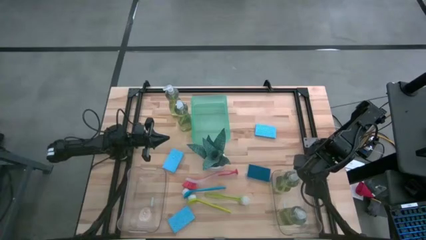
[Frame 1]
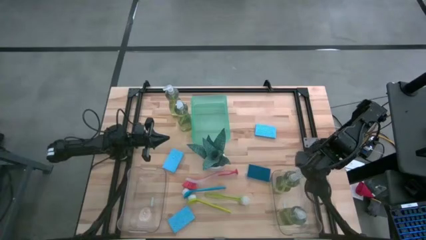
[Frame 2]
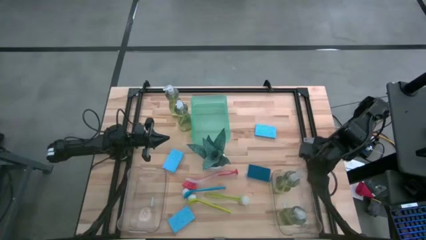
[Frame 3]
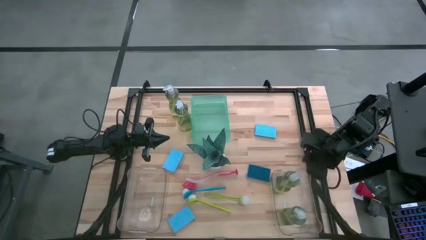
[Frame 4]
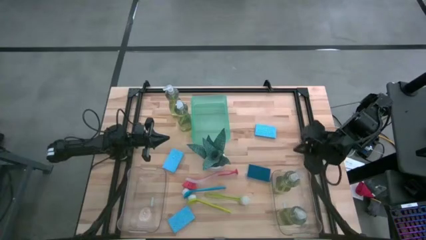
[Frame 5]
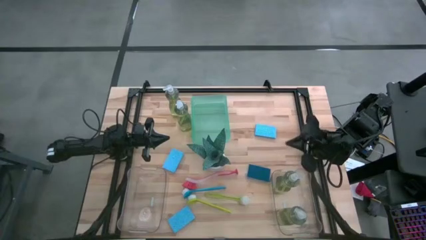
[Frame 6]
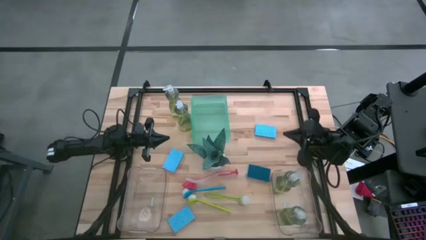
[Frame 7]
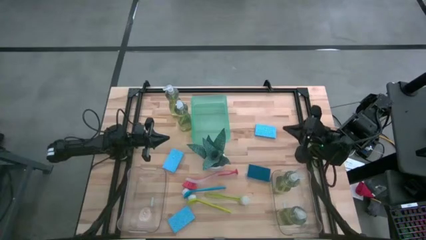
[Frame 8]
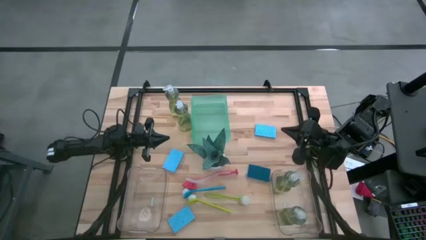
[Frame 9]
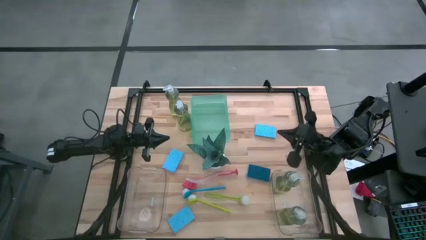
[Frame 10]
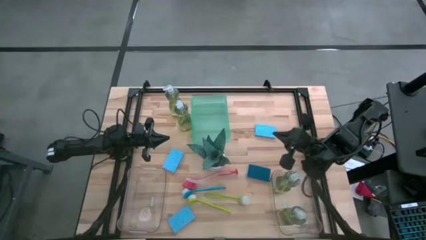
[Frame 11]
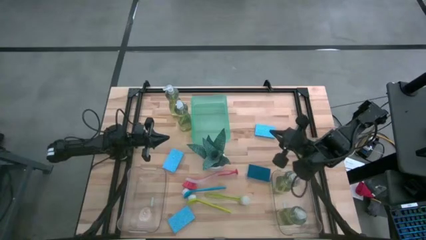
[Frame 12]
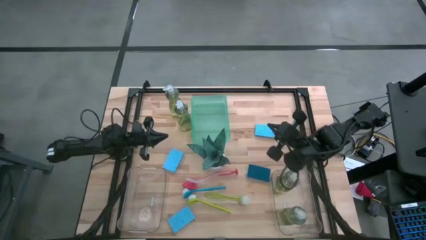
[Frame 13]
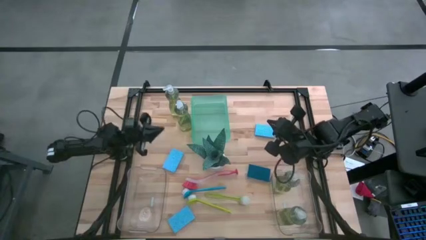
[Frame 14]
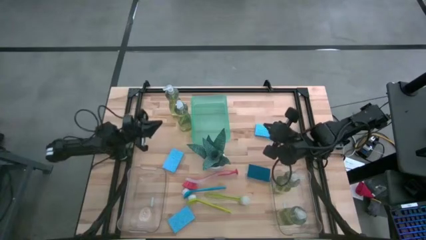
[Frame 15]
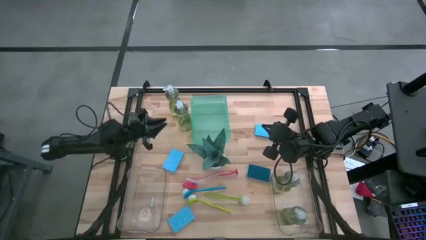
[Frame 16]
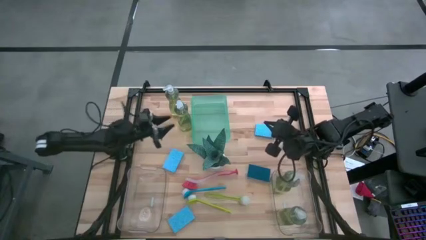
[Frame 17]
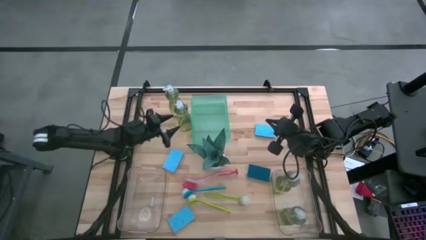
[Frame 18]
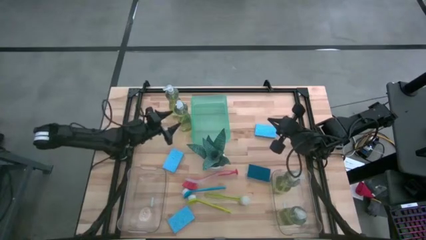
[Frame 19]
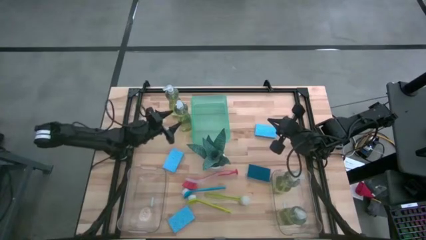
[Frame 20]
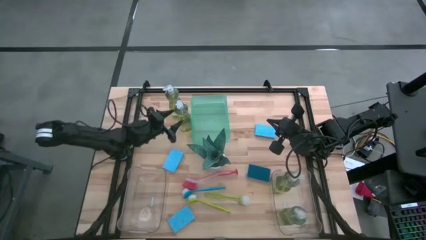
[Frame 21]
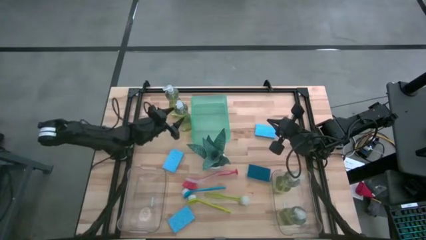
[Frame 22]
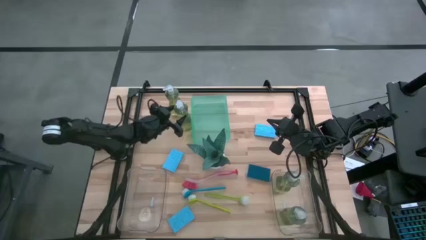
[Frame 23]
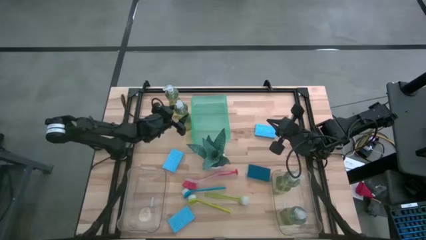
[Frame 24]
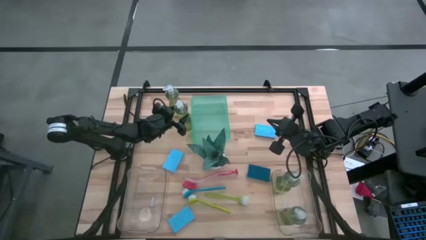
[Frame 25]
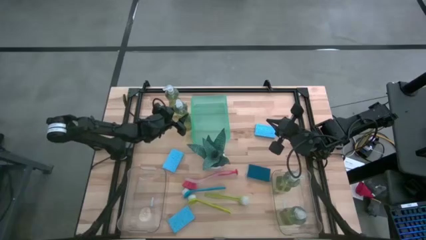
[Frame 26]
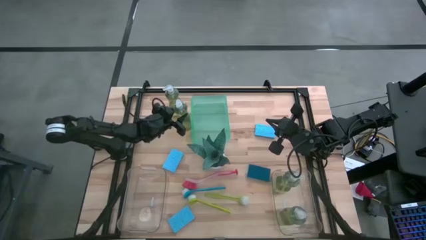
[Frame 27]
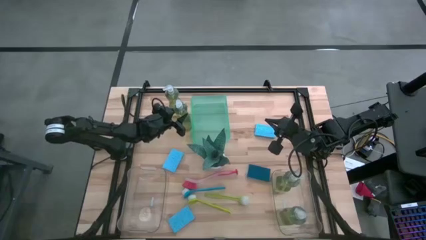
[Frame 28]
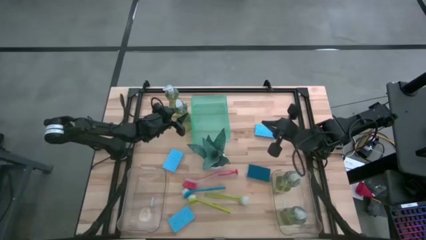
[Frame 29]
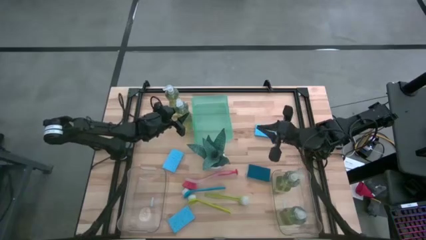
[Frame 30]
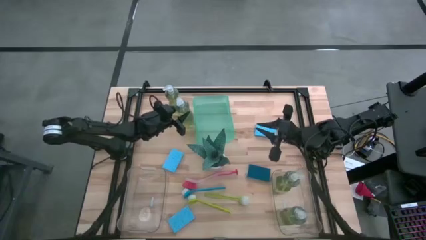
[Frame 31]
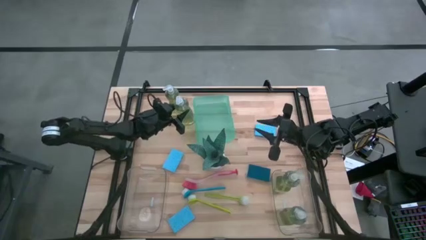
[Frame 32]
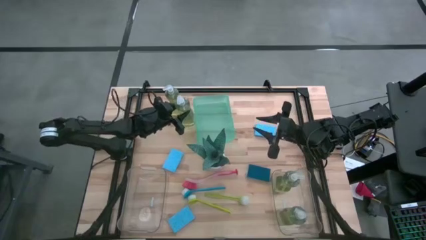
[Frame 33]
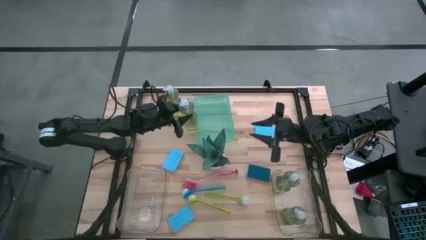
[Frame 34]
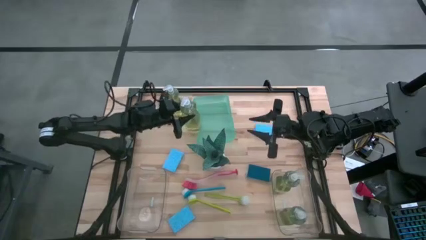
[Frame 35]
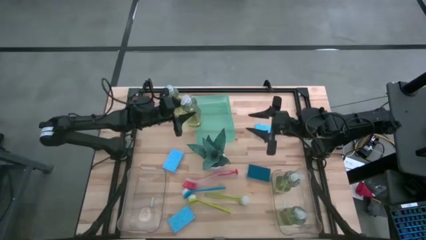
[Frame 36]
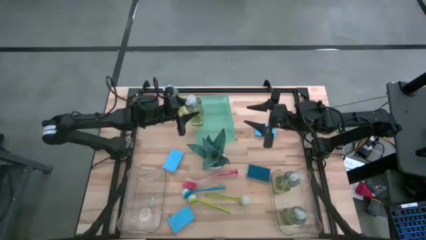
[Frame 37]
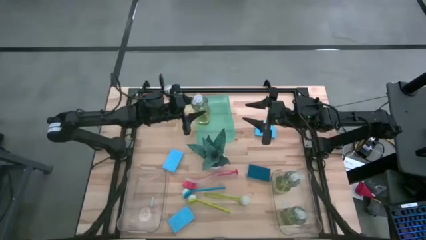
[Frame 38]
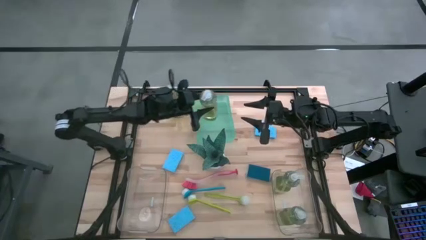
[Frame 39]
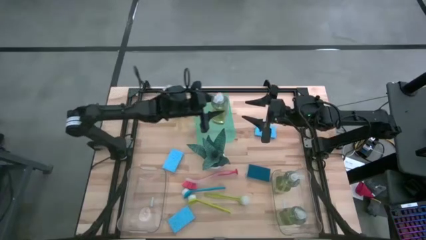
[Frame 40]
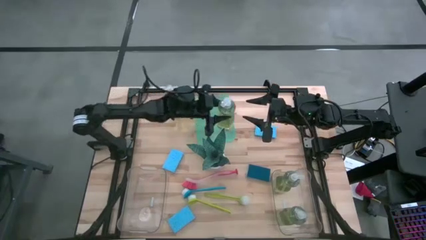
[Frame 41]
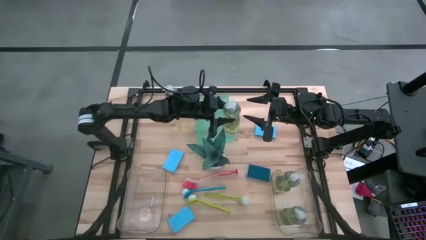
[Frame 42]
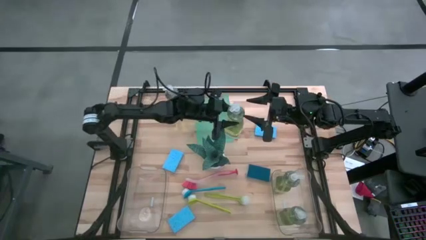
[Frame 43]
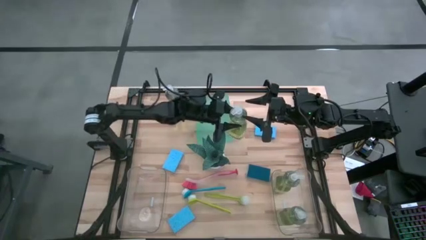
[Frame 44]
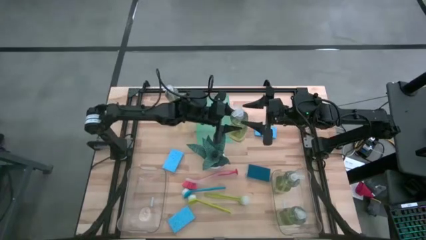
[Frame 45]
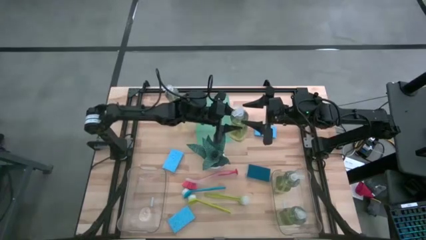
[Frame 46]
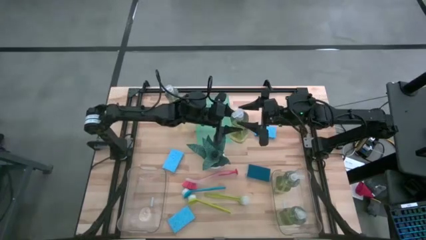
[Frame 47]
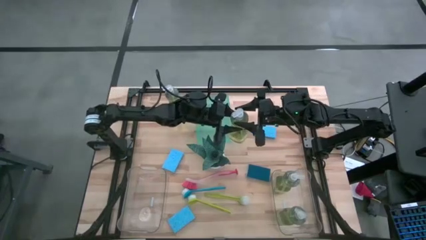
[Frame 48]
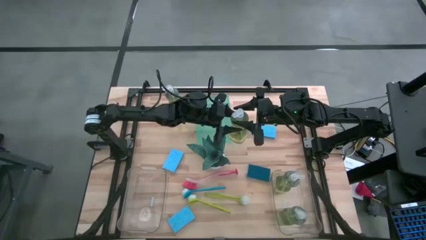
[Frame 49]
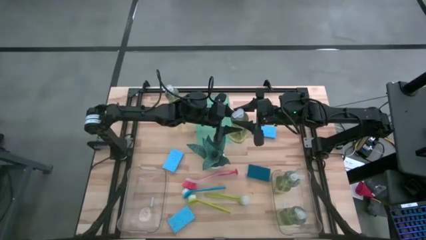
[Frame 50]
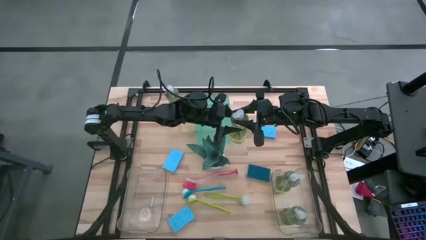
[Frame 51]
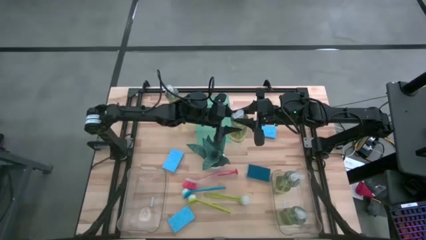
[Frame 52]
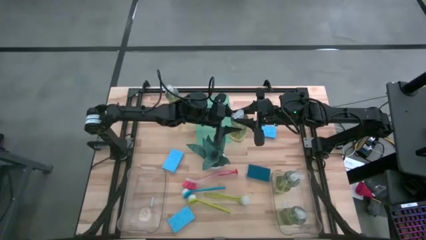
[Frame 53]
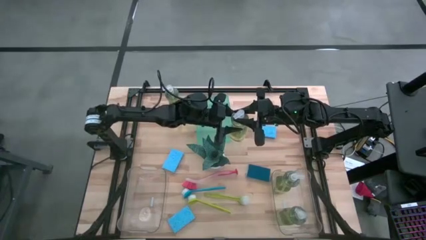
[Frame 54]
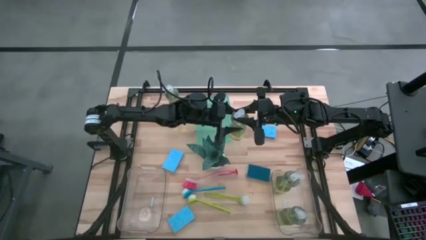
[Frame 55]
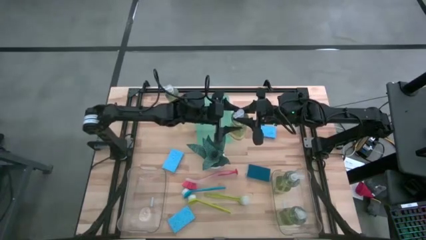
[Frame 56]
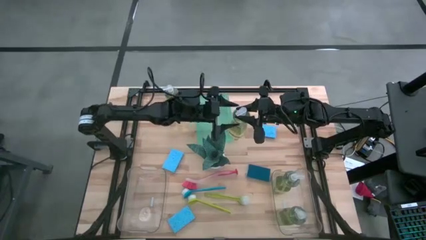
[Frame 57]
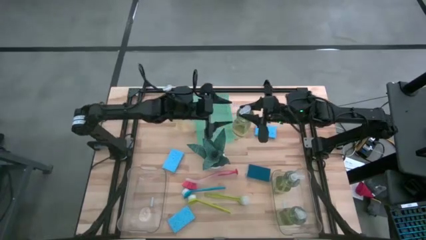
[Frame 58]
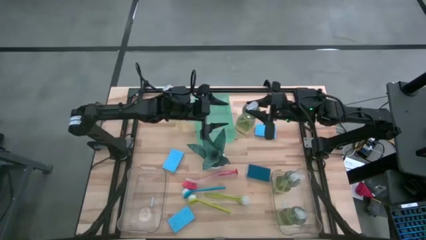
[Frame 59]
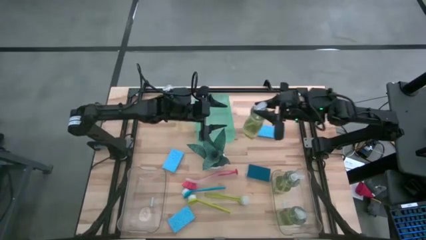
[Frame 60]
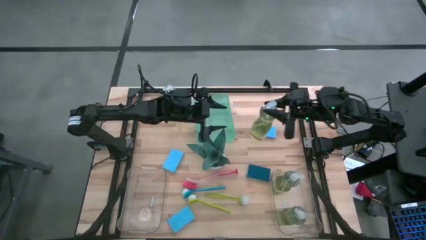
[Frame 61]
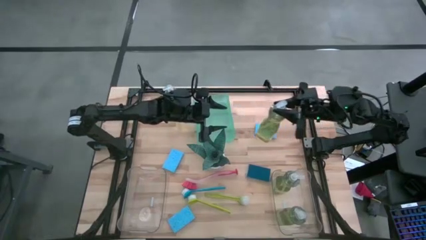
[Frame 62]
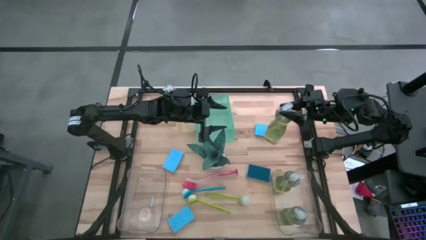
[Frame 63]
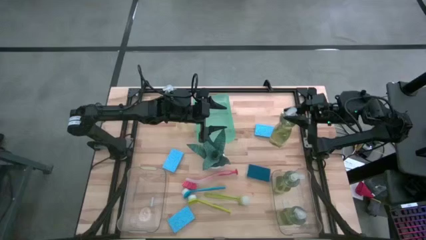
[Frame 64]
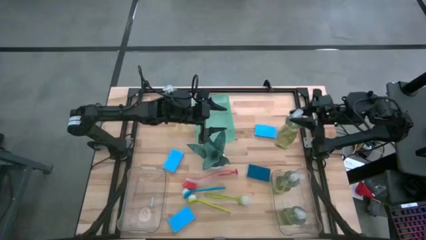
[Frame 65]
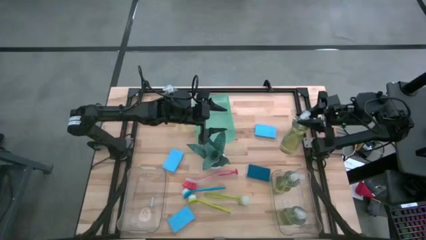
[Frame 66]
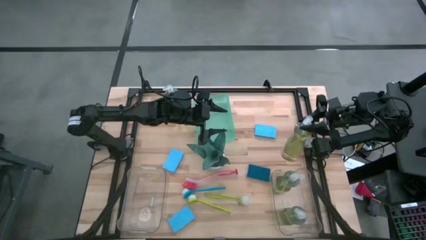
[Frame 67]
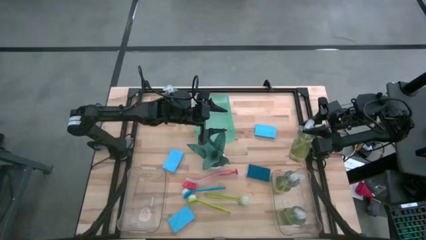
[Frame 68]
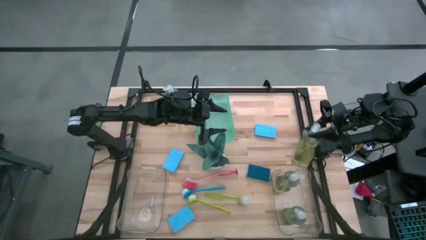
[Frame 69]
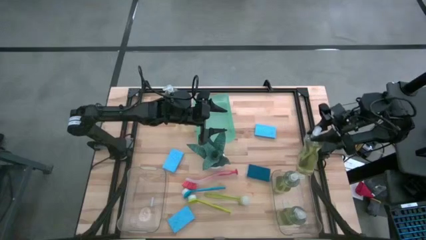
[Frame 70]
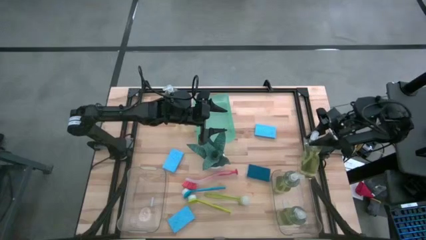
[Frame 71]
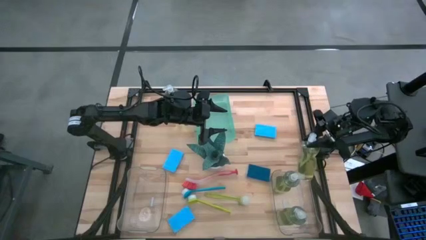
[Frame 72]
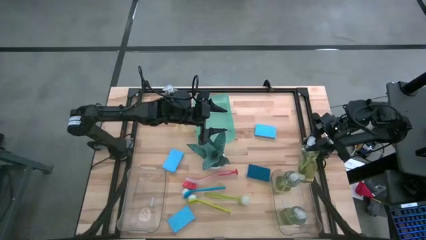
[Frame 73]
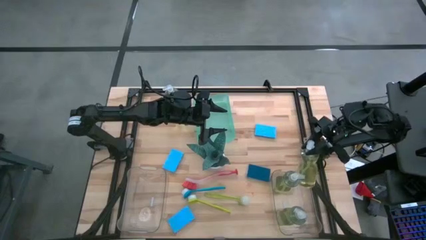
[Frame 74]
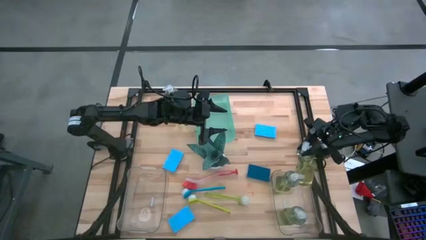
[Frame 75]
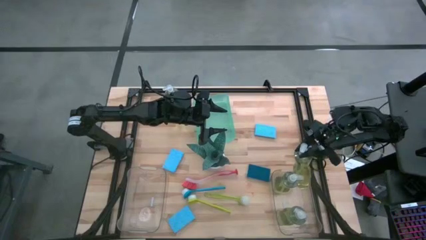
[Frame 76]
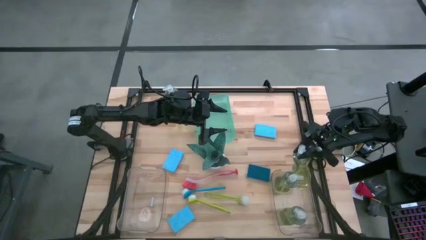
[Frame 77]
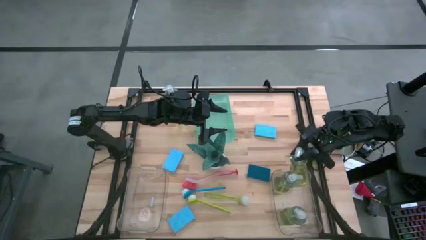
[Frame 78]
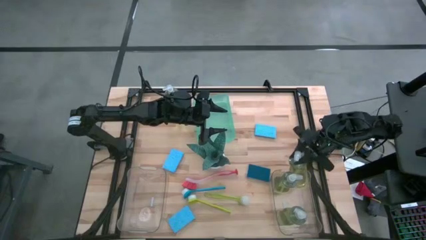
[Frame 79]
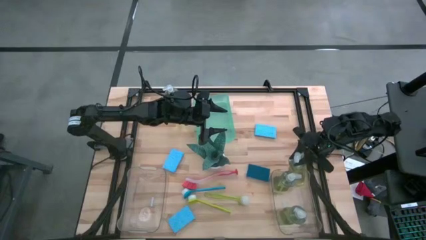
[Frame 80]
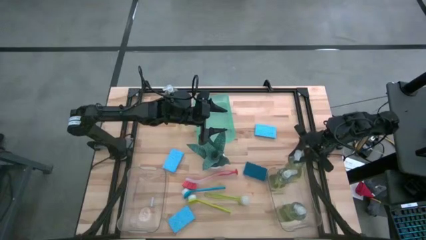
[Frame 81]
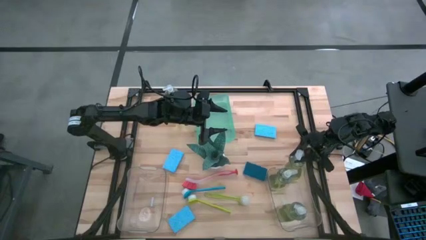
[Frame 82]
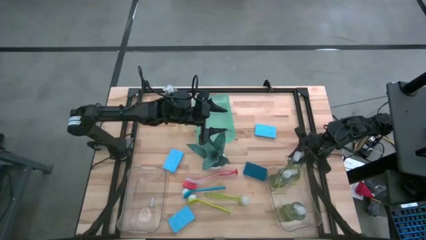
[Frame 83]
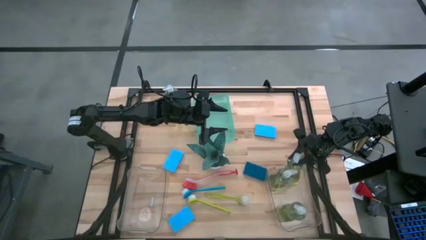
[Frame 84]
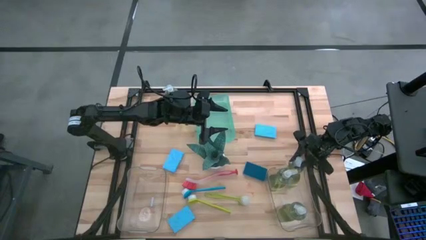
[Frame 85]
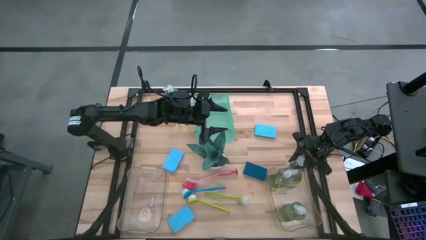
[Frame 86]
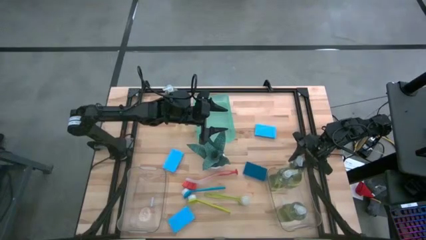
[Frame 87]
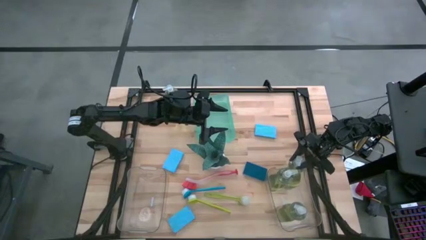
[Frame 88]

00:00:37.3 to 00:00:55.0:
Task: Pick & Place Kitchen Sink Supplies
Put the yellow soap dispenser into the right transparent bin
